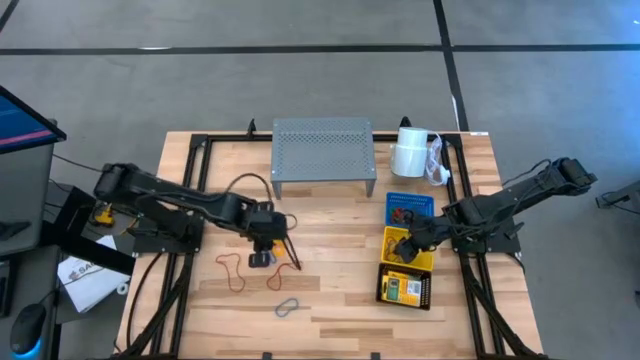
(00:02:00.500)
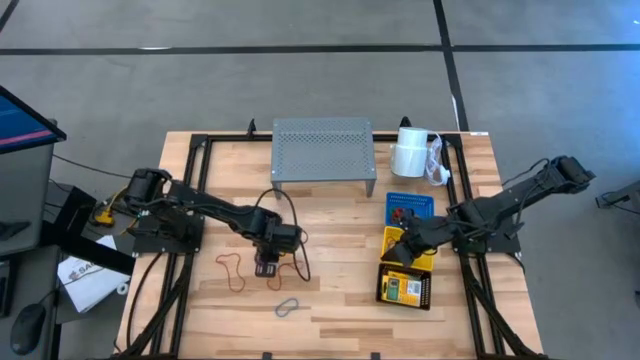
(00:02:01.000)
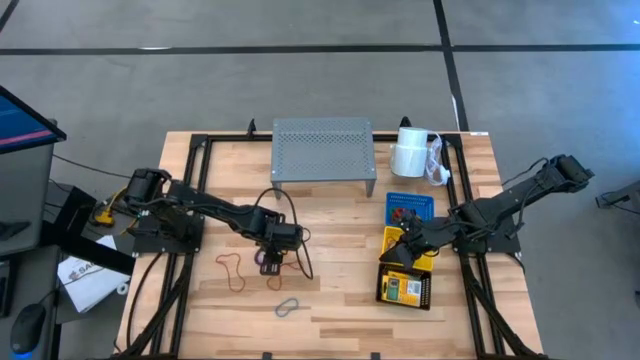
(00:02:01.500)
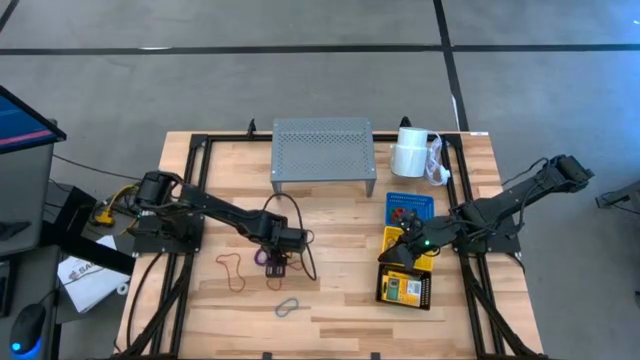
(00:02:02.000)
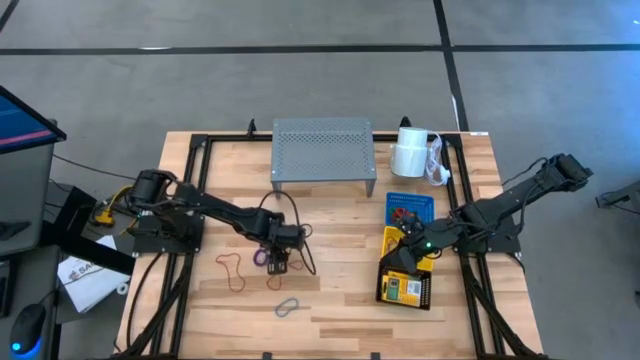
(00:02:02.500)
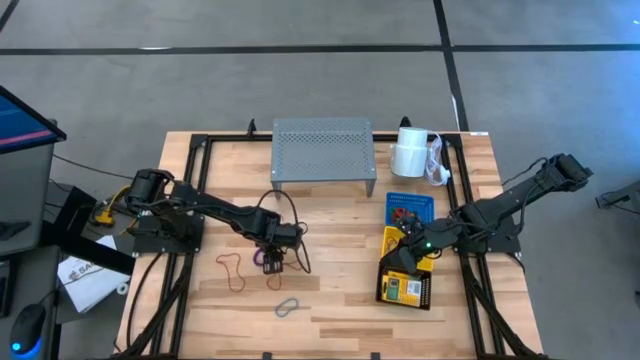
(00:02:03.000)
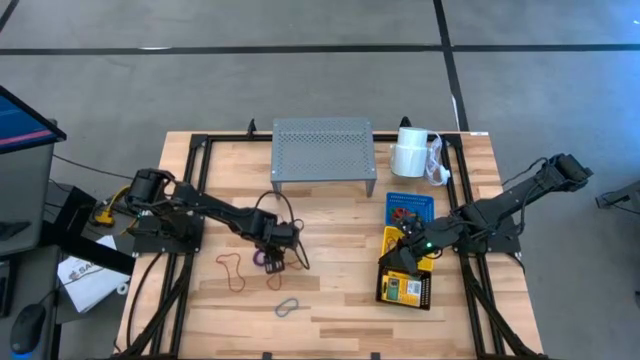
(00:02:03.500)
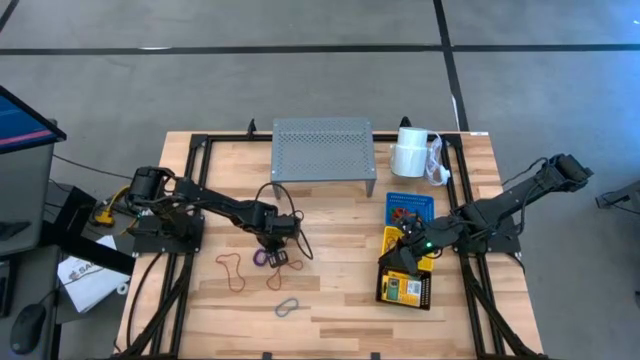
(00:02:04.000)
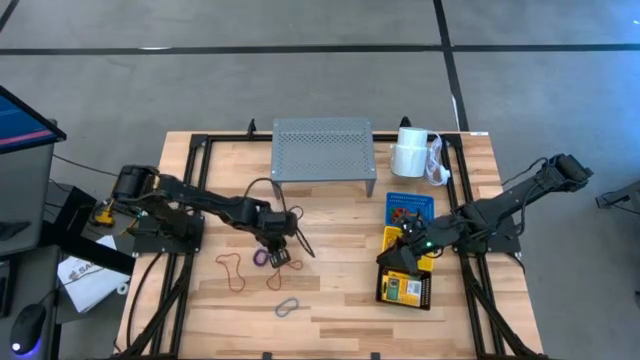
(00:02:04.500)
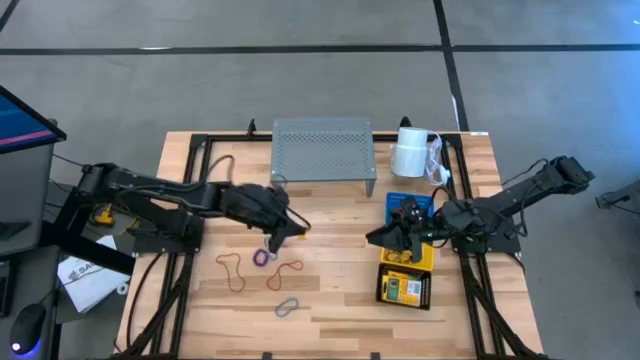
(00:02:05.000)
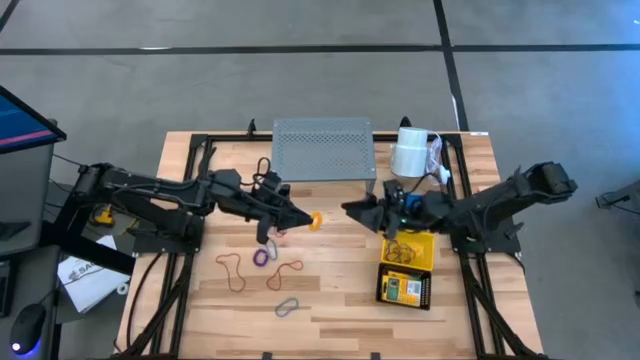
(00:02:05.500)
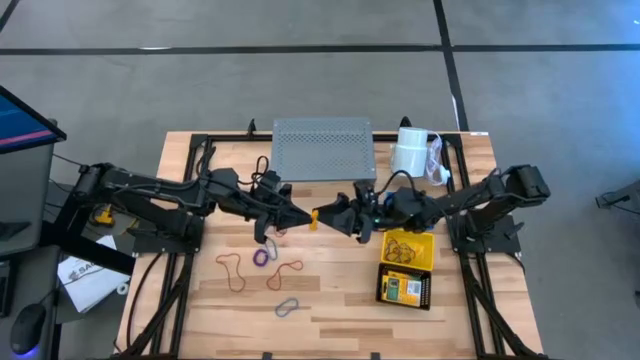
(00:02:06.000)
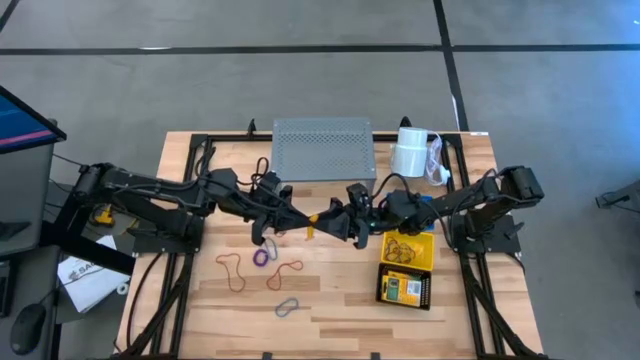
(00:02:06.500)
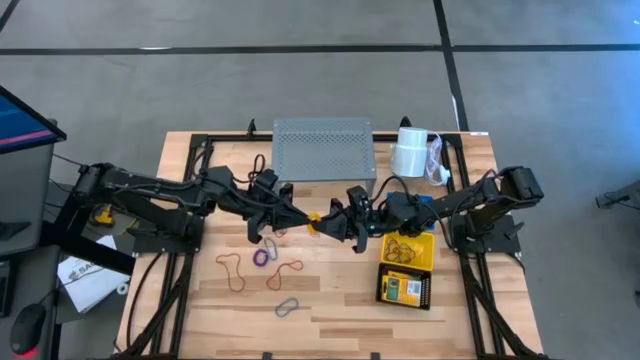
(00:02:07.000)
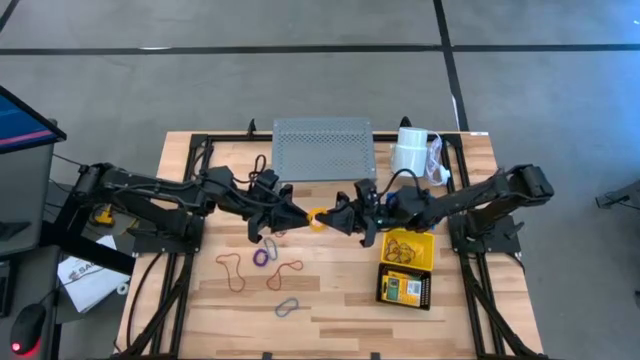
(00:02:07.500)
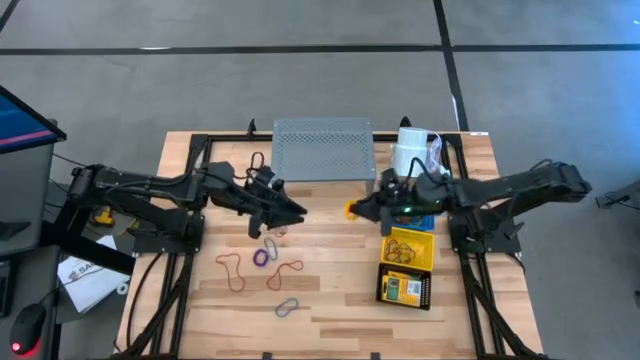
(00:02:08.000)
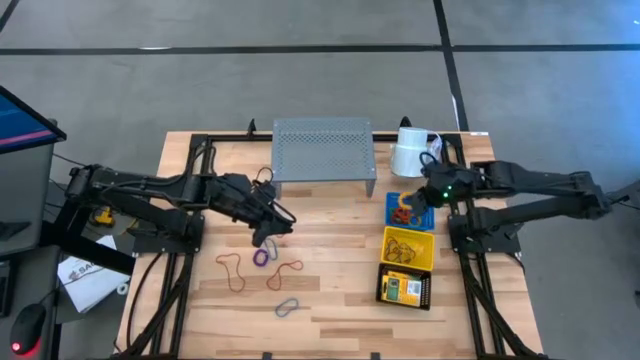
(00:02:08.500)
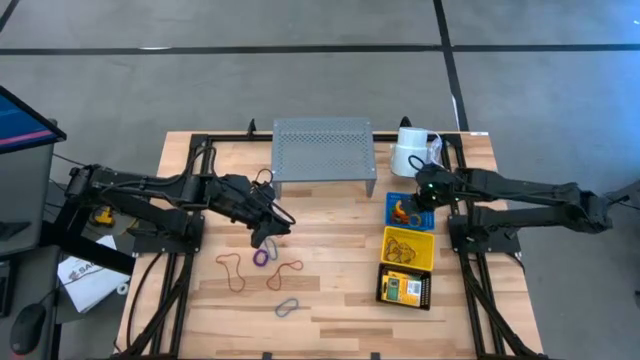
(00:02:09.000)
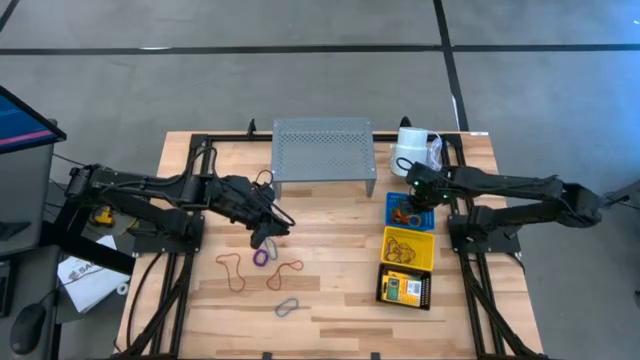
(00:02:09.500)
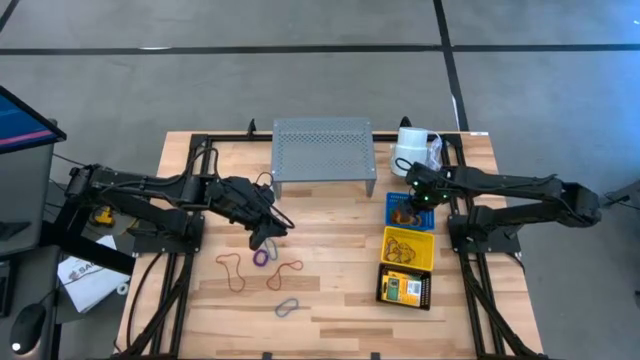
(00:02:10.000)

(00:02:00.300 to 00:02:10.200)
Task: Pick & Place Office Desk Supplies
Put the yellow spring keychain into the blue basket

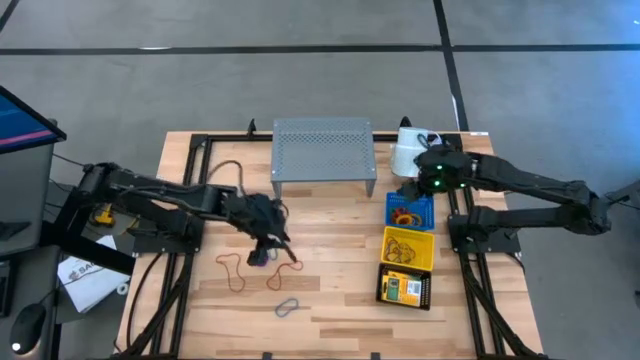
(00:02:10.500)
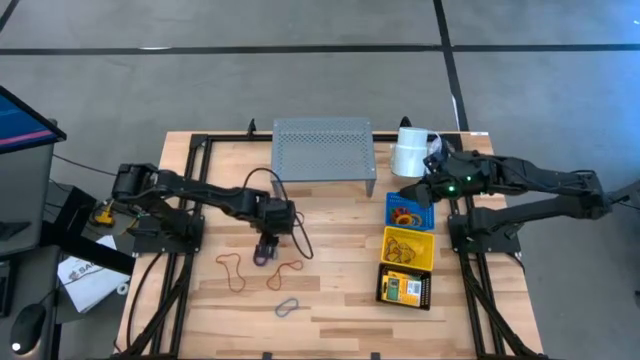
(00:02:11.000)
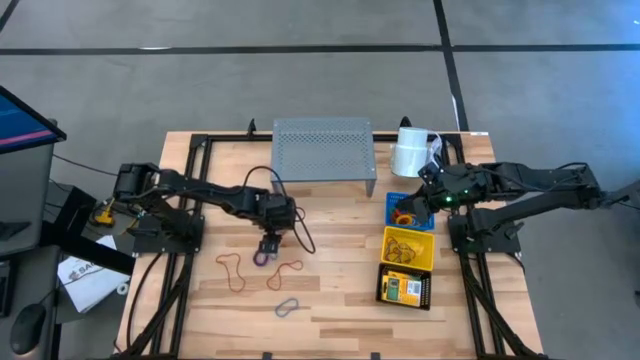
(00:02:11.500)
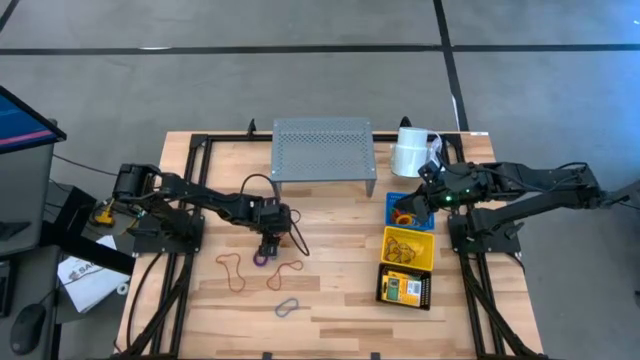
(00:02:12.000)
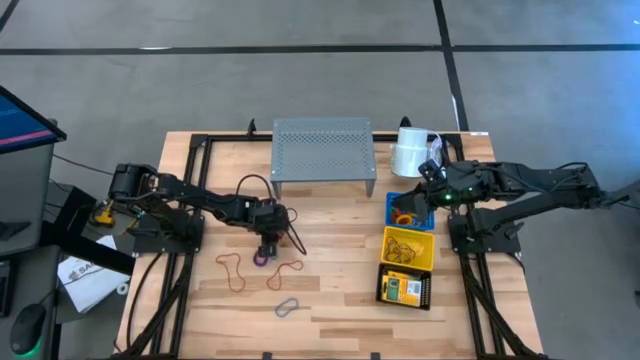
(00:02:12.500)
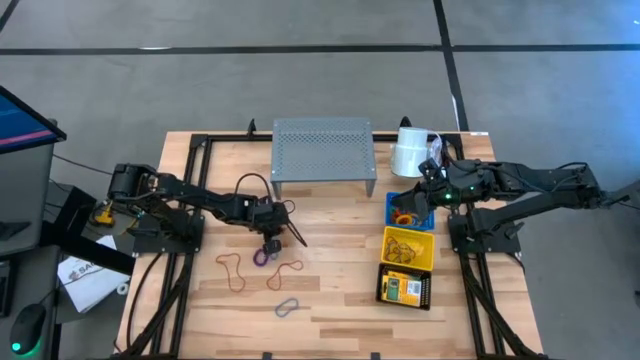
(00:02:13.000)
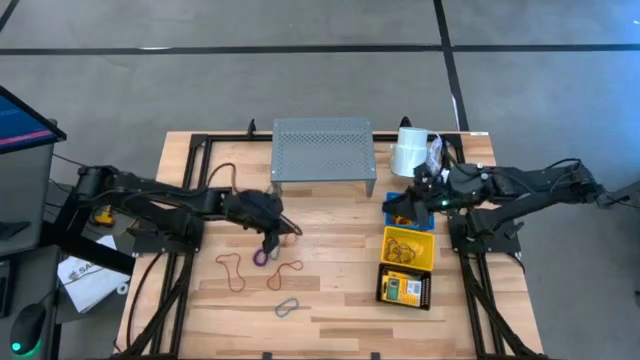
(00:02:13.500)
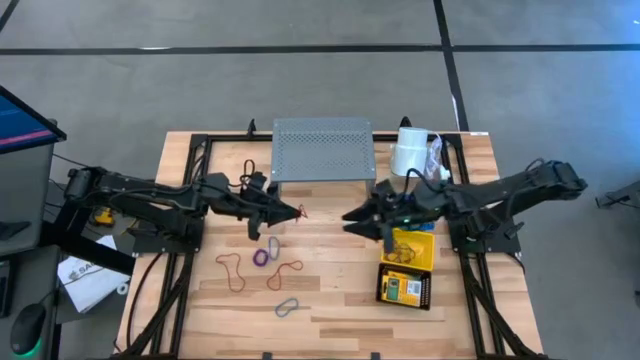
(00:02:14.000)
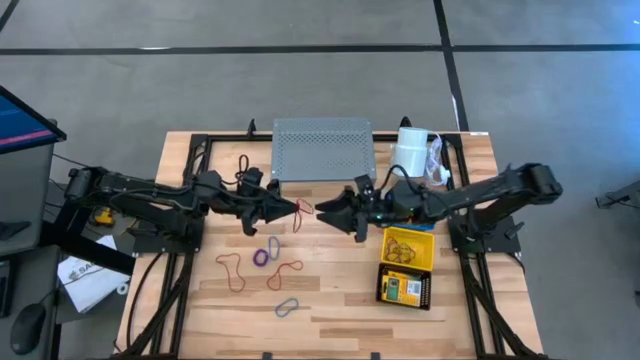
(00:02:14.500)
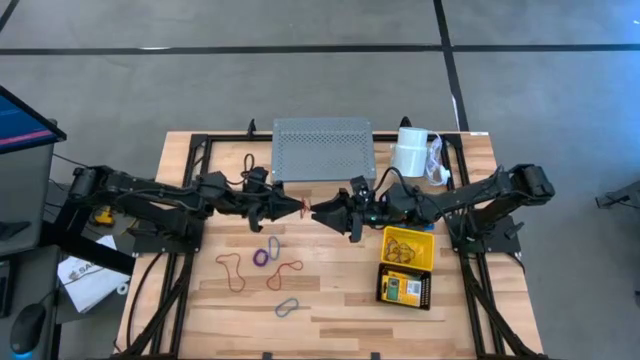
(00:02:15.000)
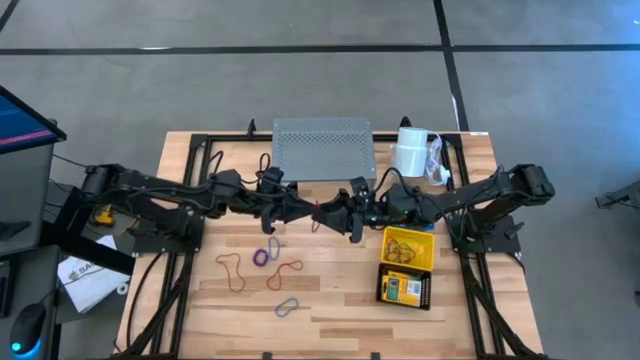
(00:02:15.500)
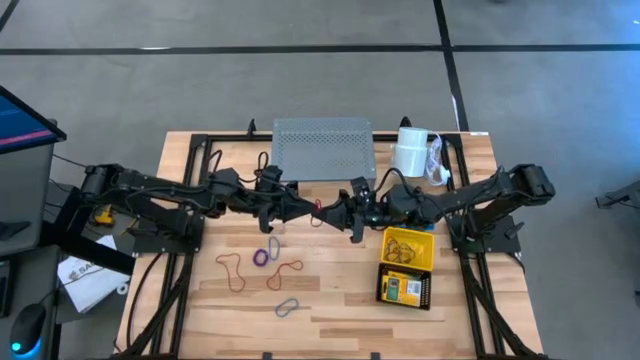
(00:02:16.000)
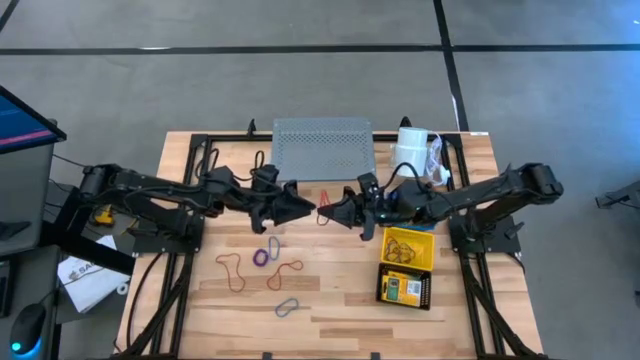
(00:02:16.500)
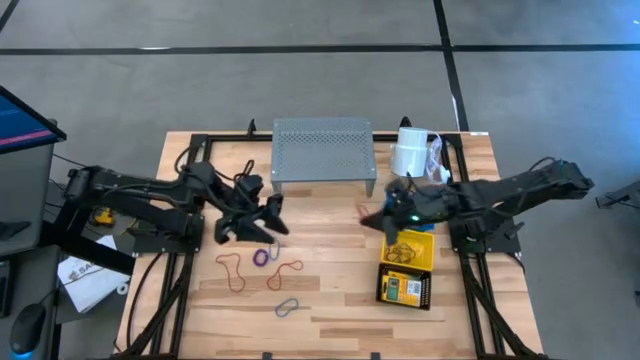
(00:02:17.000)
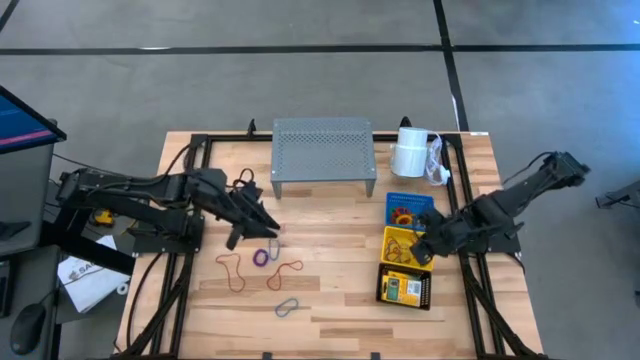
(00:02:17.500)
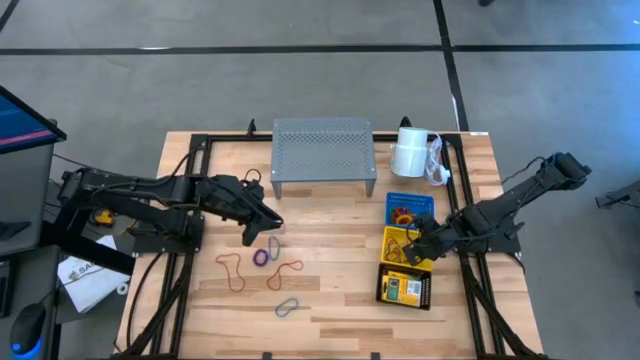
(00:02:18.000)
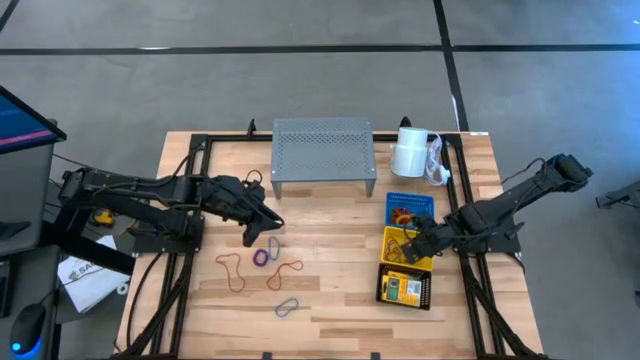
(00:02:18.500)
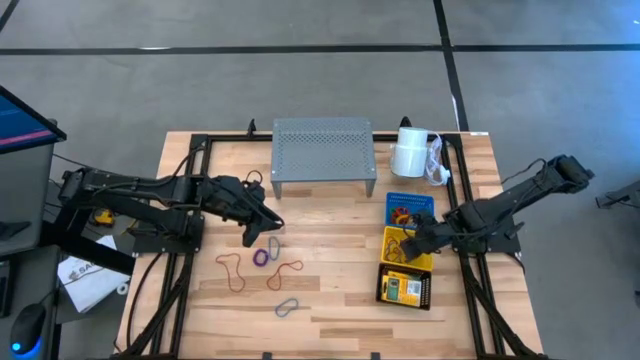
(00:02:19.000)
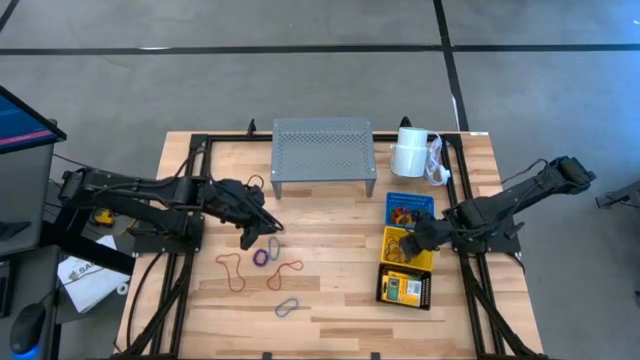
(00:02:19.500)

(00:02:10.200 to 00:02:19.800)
Put the red rubber band into the yellow basket
